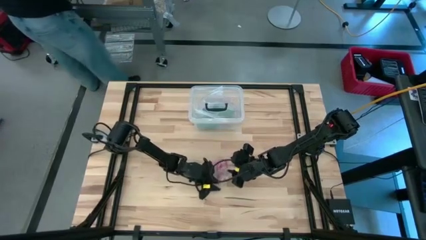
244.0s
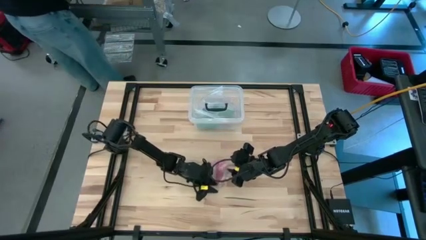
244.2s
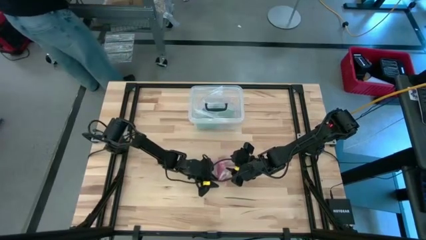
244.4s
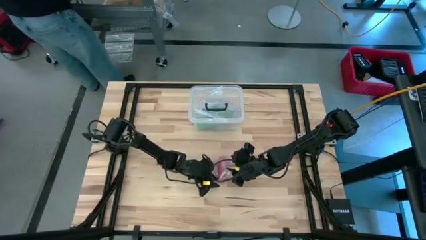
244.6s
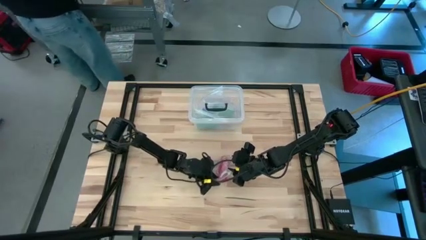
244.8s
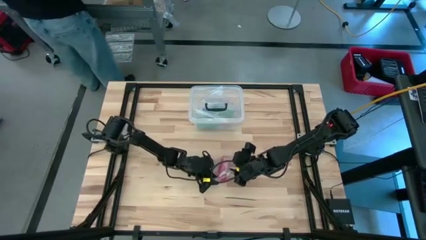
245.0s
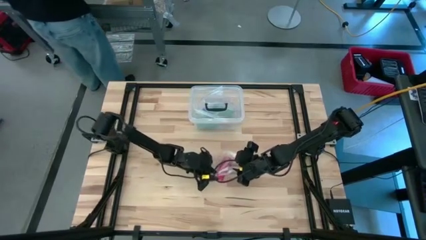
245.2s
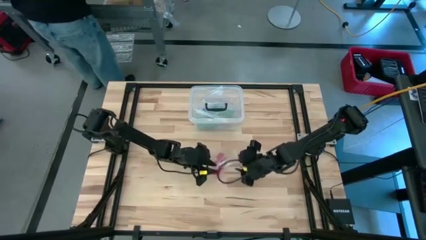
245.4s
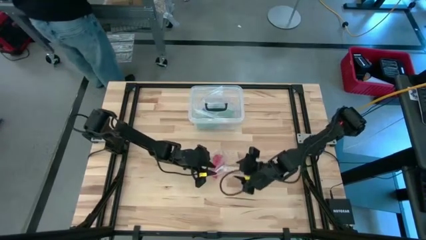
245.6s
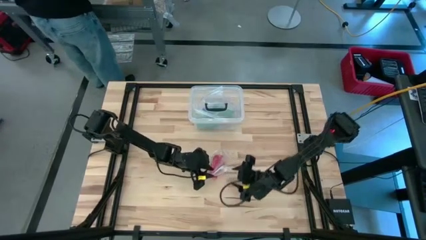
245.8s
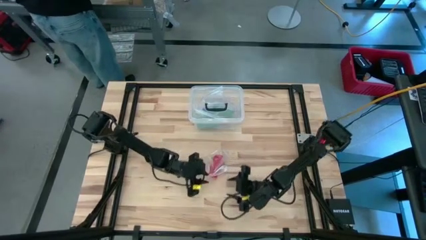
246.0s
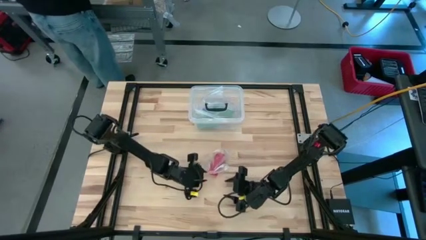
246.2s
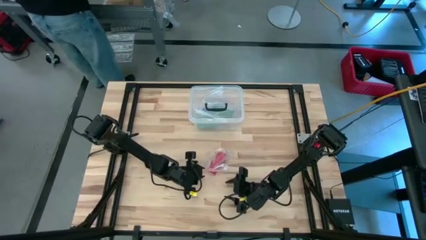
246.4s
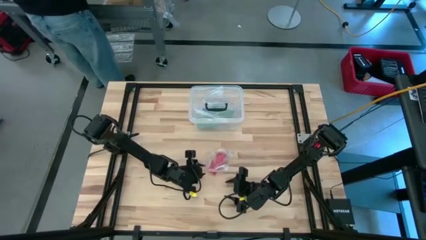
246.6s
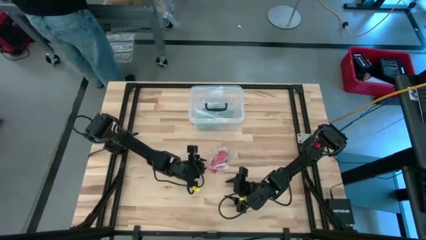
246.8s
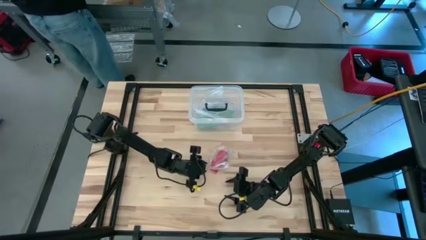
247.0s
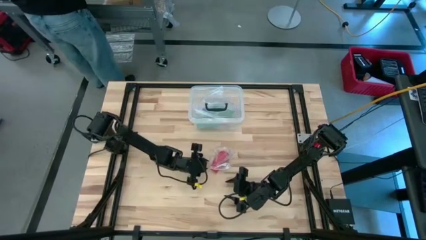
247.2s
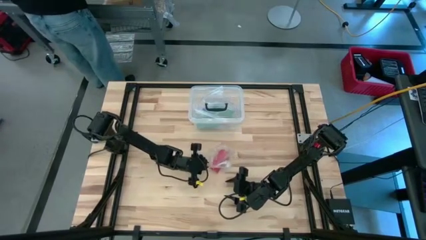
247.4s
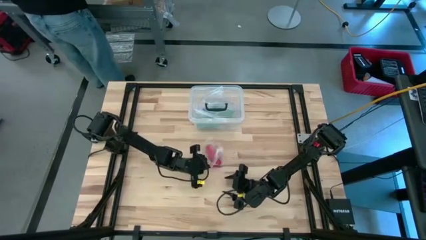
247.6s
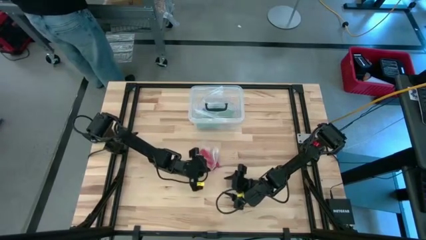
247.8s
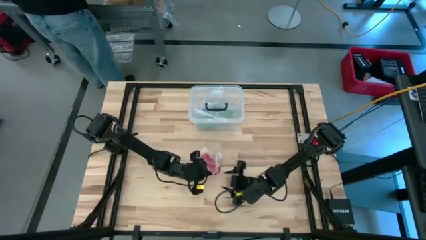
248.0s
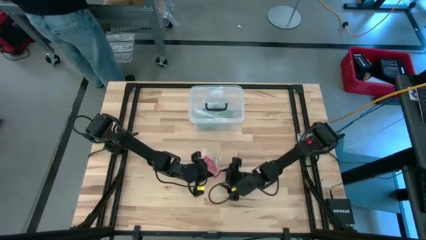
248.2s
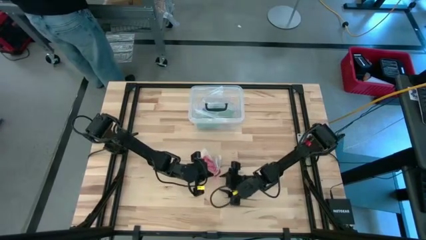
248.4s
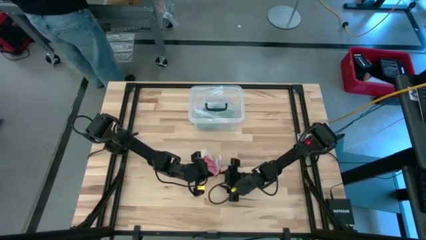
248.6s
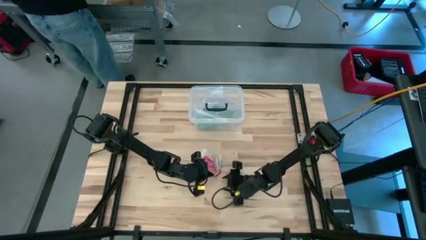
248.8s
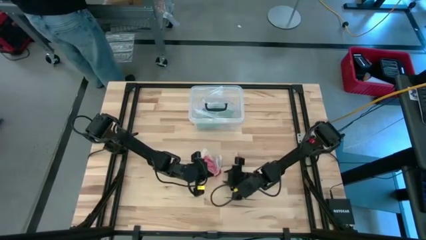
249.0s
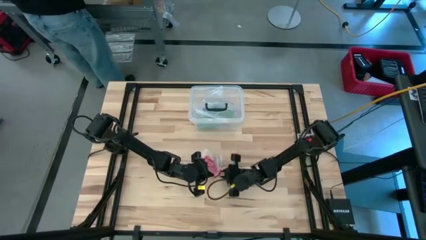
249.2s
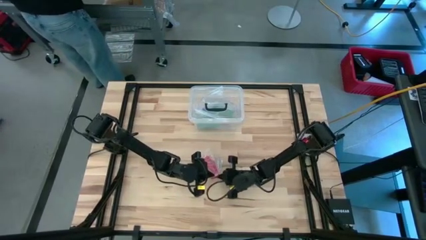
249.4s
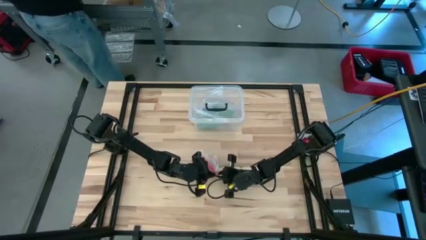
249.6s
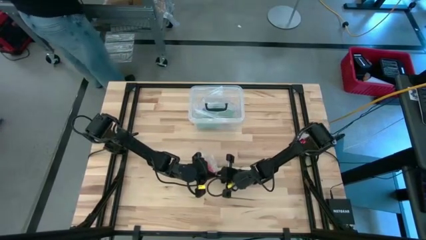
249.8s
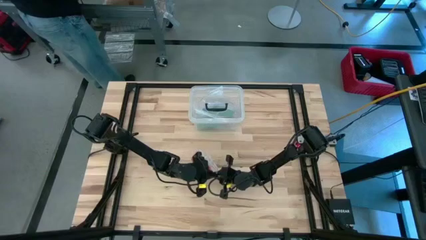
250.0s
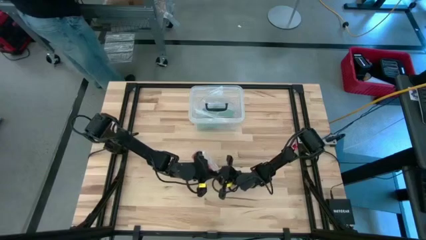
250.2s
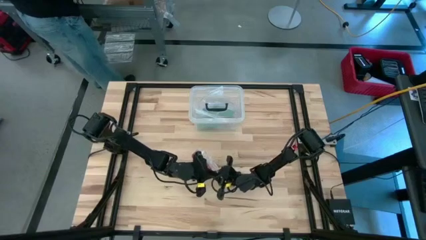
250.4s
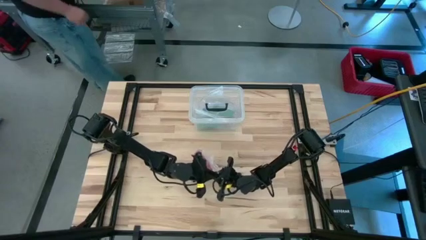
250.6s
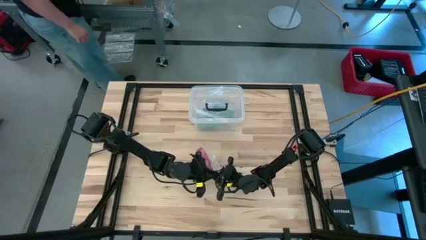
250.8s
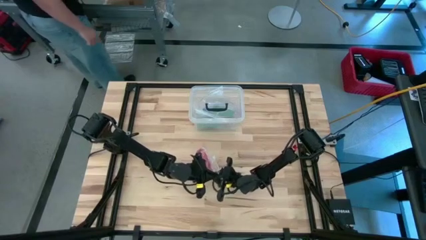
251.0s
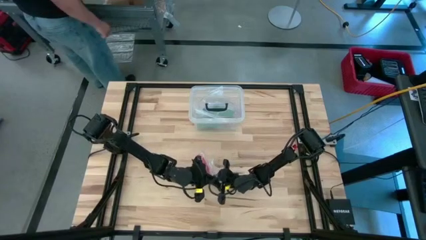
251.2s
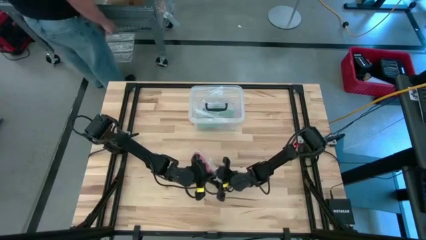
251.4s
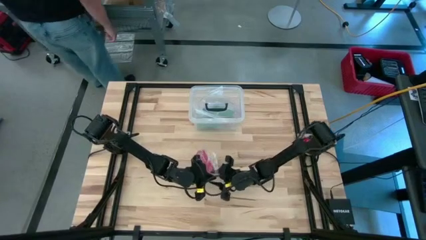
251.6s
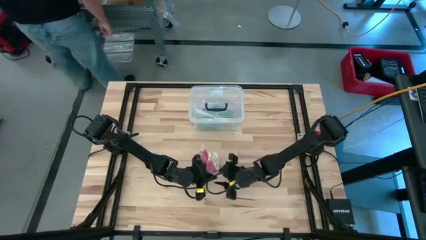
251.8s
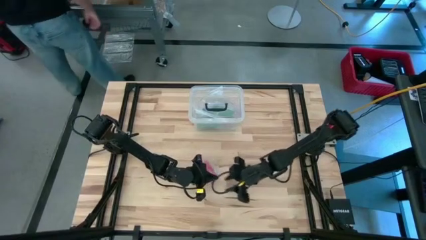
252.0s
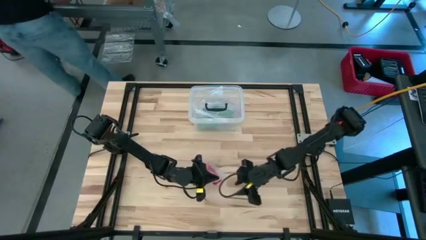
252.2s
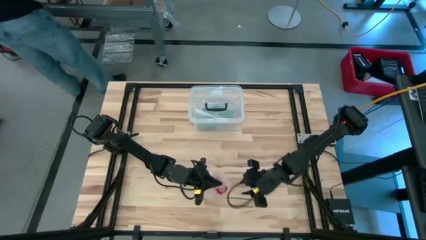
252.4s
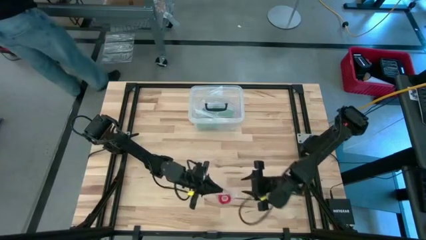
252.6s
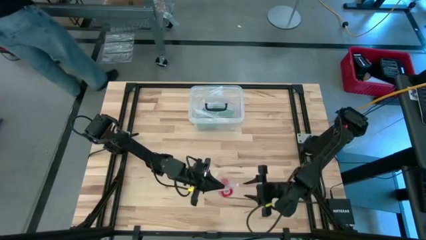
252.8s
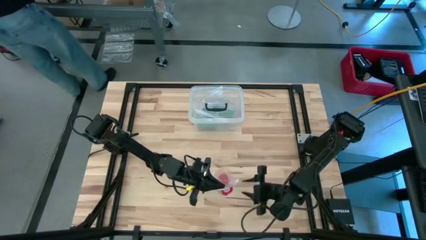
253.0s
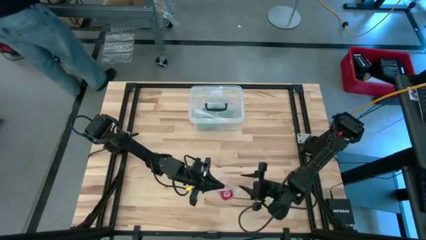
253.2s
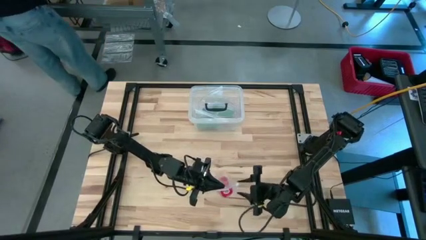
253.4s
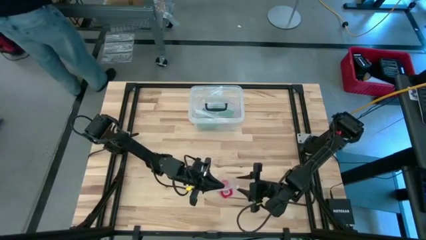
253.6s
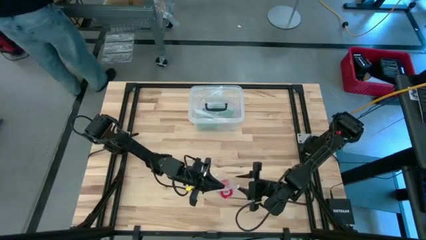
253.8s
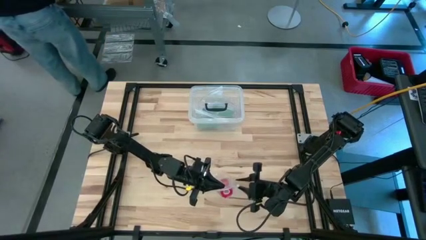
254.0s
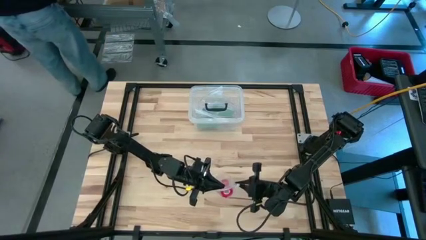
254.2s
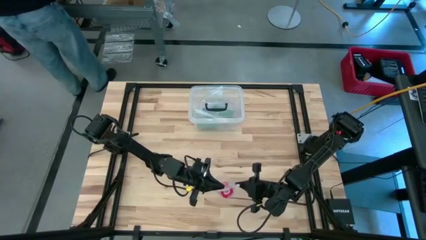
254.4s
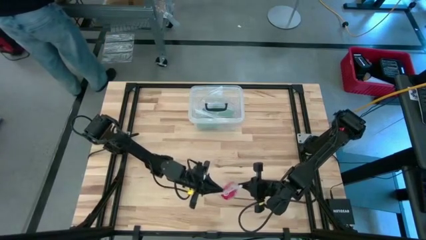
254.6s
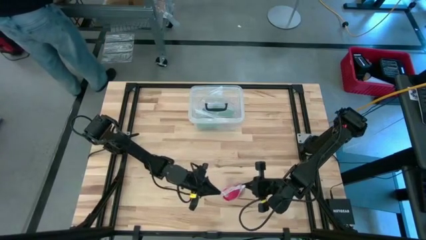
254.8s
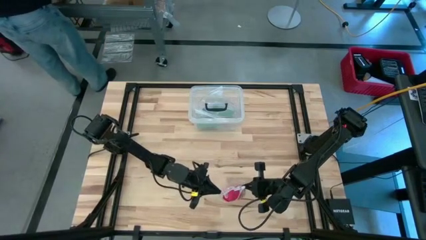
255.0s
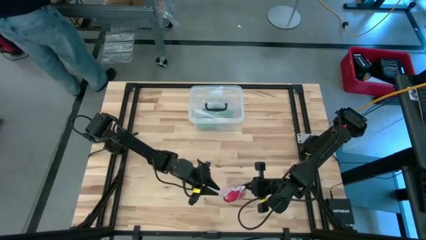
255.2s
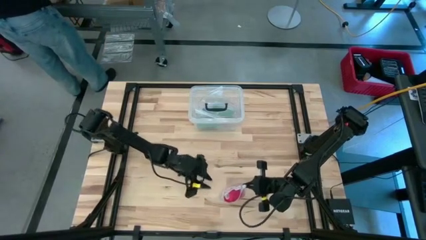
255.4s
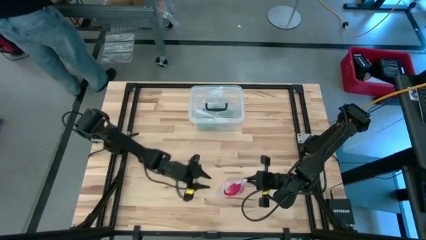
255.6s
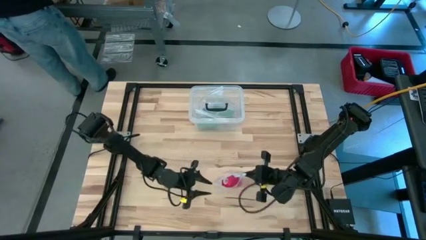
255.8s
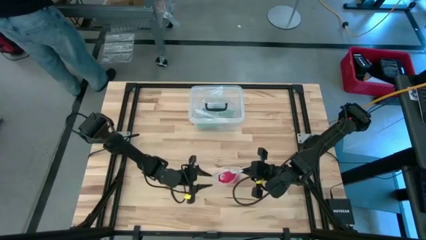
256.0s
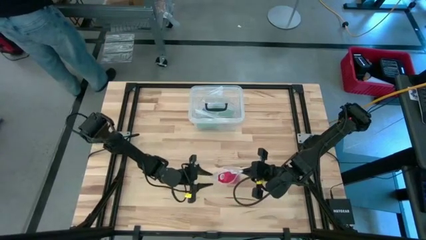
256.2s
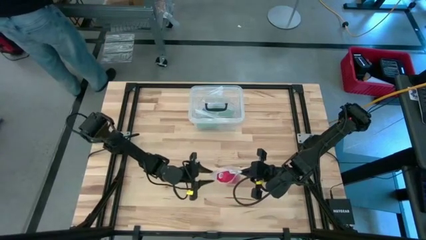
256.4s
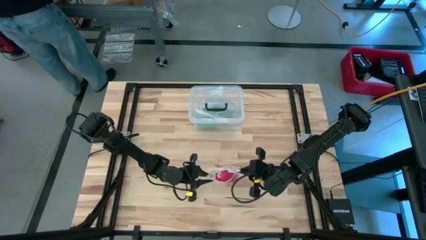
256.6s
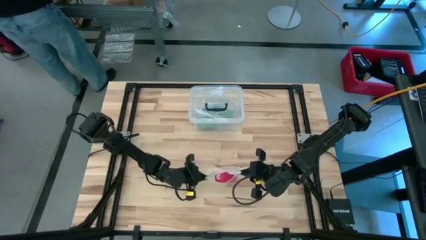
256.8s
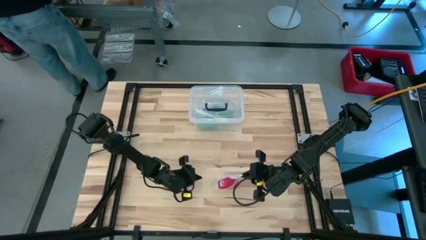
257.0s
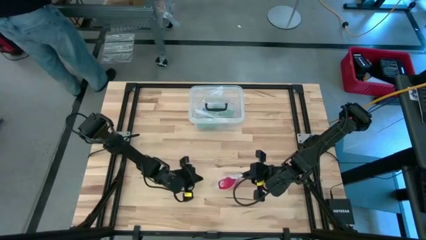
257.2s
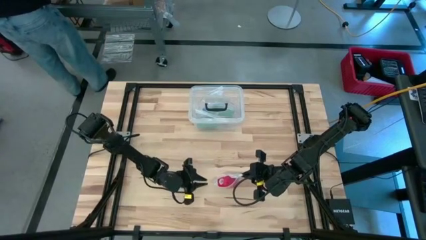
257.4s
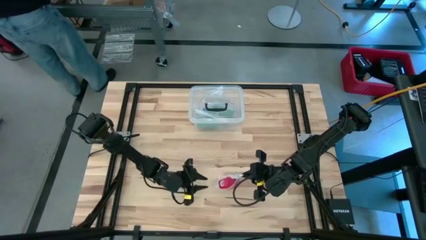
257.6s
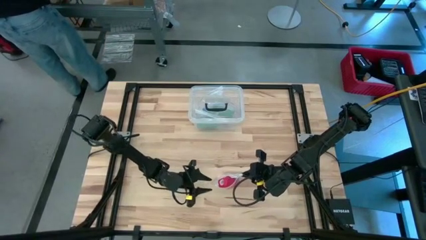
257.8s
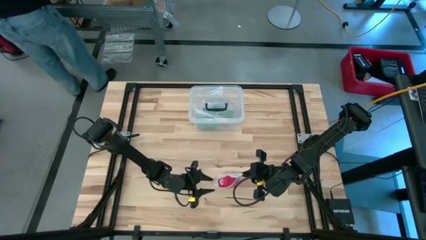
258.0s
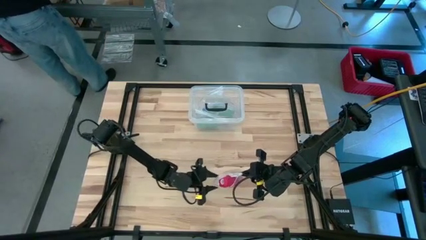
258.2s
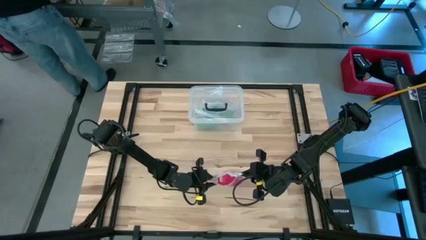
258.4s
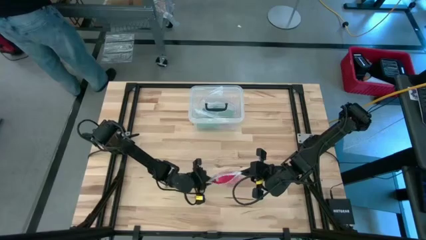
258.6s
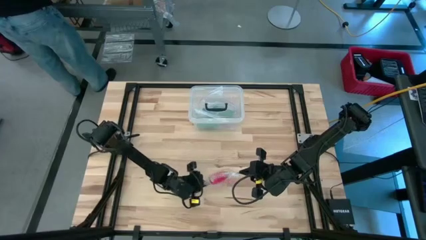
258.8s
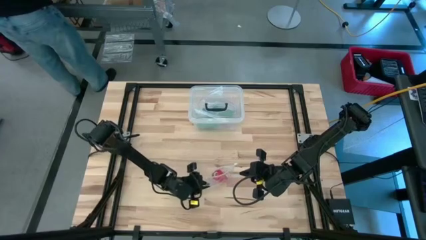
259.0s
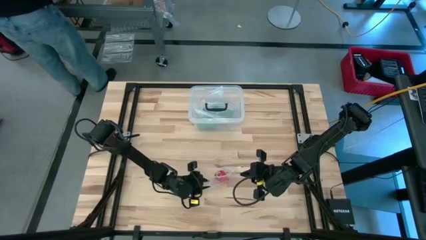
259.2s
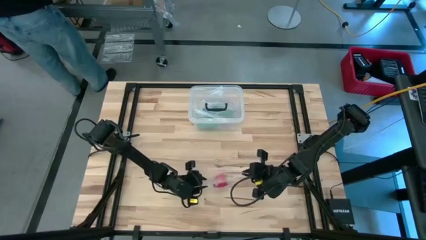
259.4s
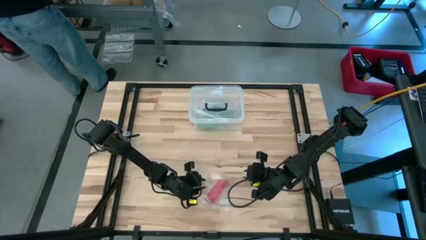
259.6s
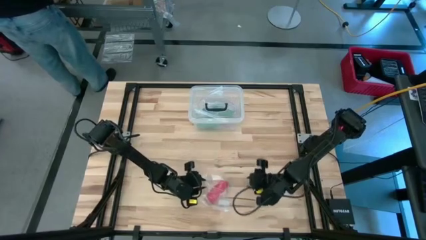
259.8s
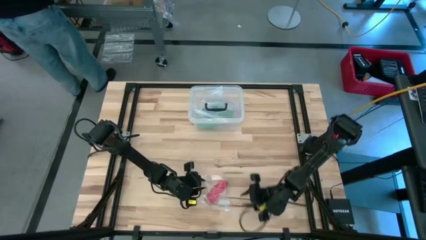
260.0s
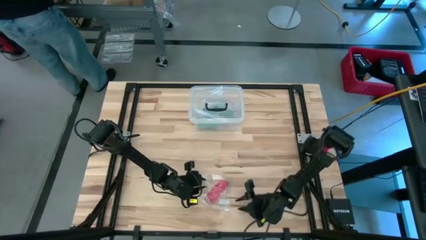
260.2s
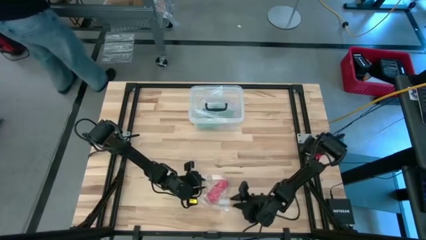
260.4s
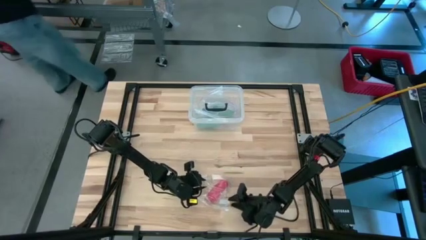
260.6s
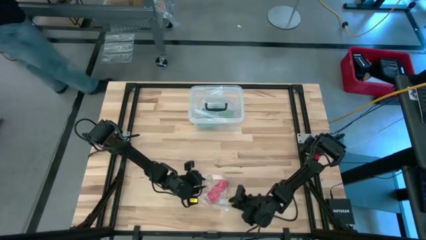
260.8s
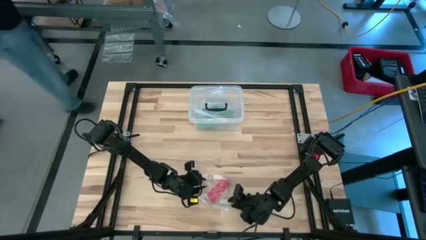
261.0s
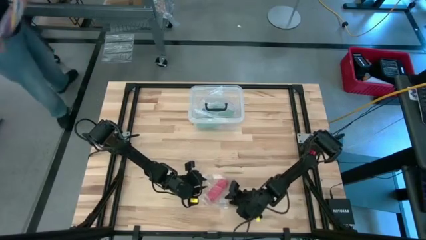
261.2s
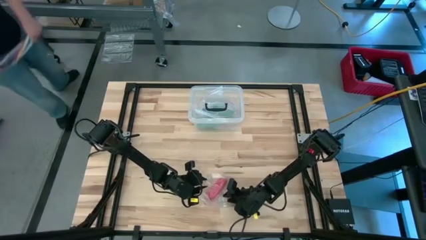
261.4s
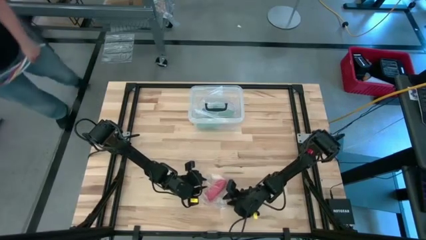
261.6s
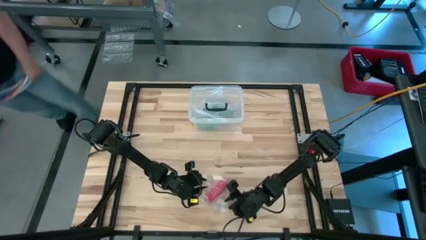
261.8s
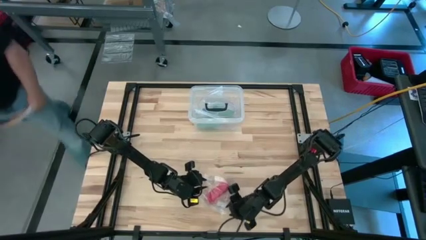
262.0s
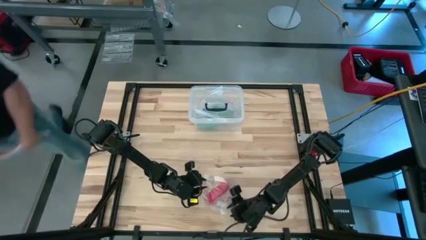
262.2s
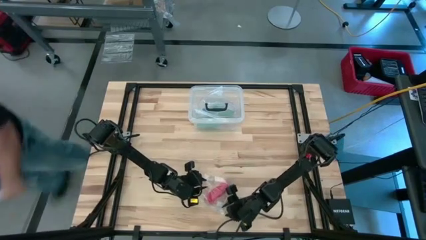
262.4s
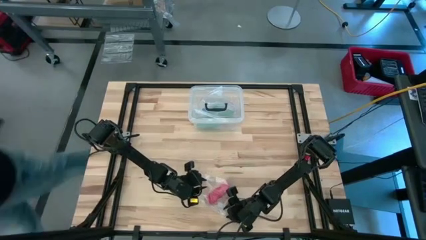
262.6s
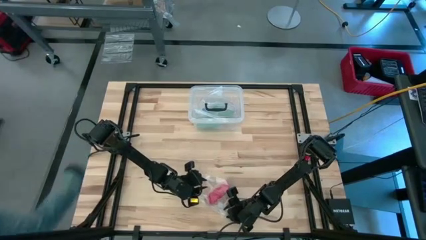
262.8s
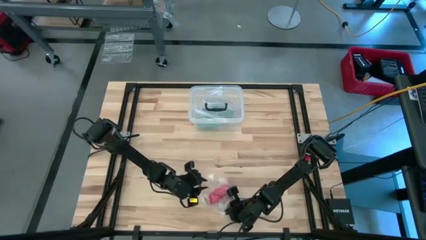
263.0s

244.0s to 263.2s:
Task: Roll bandage
Put the red bandage into the transparent zip bag
